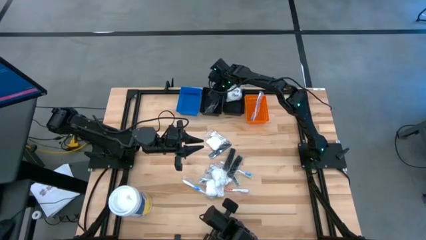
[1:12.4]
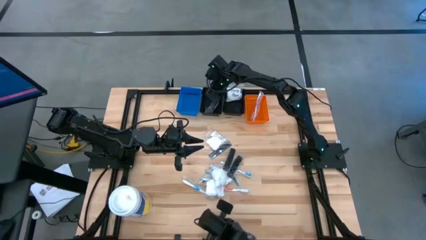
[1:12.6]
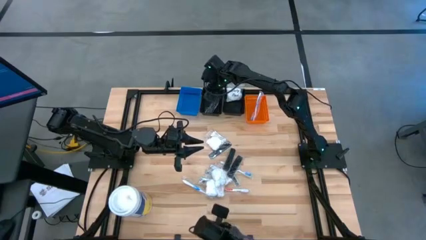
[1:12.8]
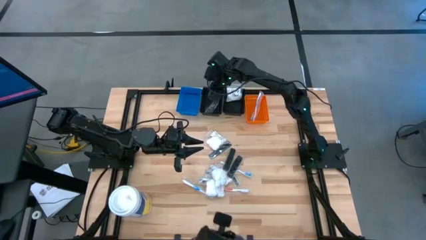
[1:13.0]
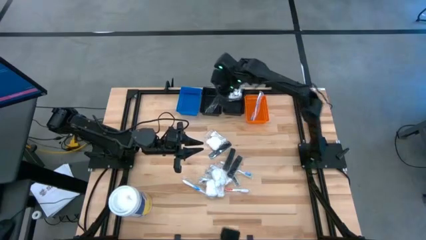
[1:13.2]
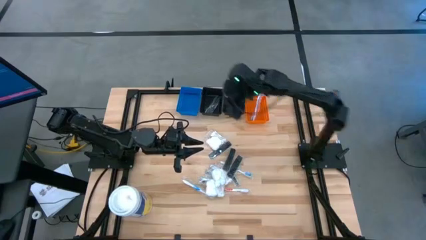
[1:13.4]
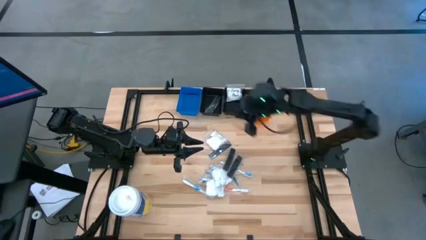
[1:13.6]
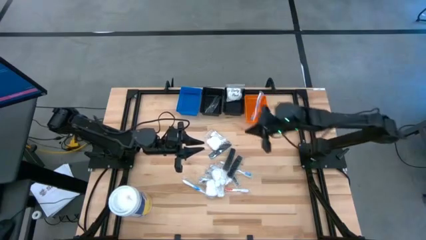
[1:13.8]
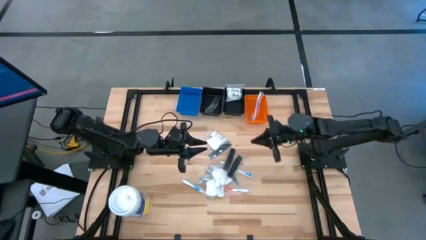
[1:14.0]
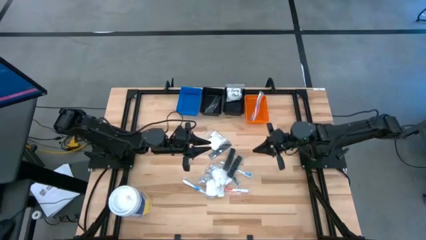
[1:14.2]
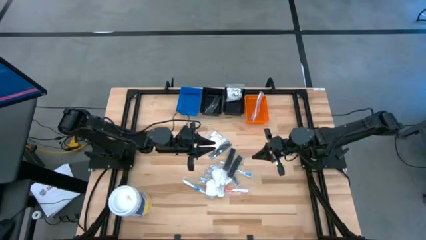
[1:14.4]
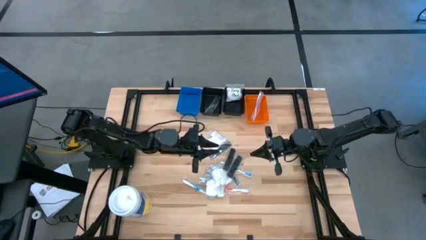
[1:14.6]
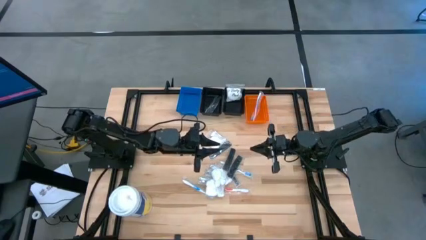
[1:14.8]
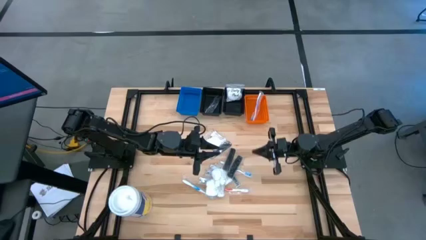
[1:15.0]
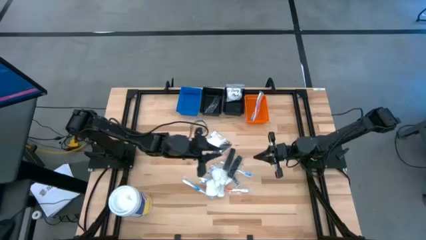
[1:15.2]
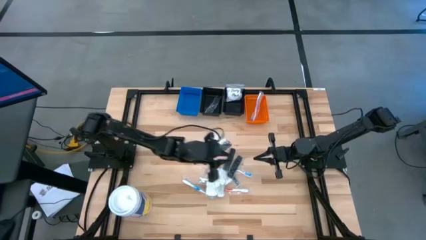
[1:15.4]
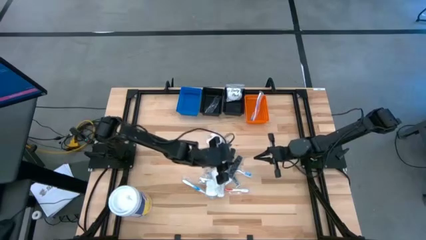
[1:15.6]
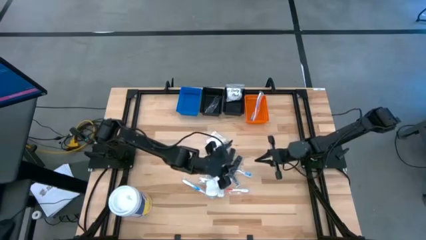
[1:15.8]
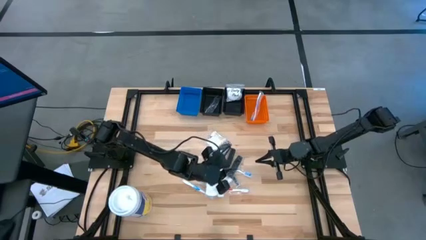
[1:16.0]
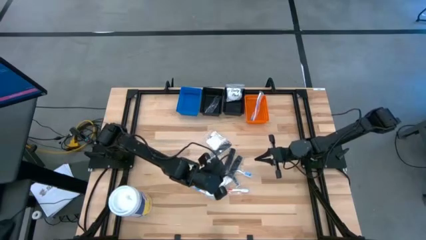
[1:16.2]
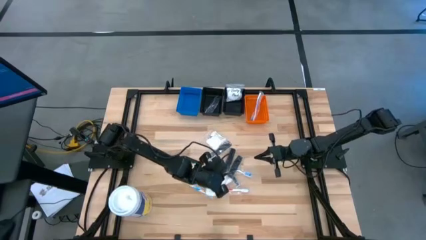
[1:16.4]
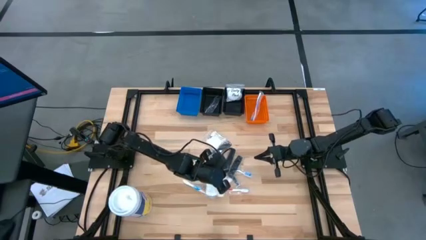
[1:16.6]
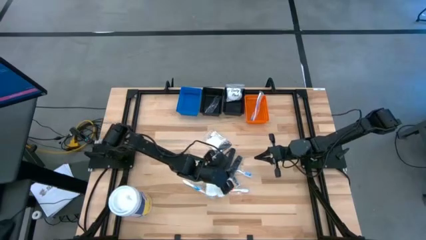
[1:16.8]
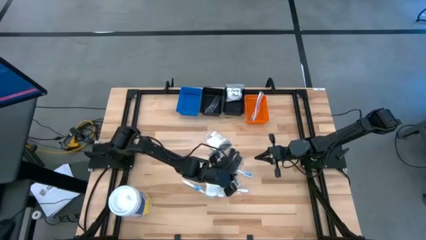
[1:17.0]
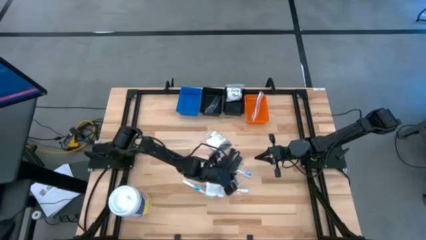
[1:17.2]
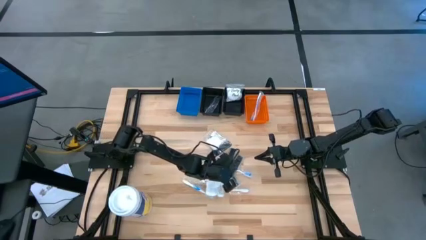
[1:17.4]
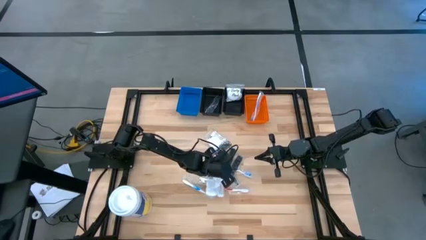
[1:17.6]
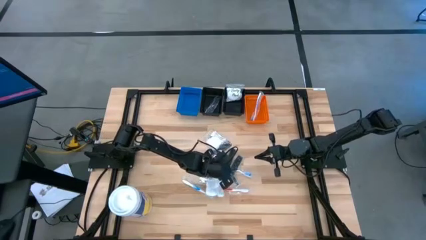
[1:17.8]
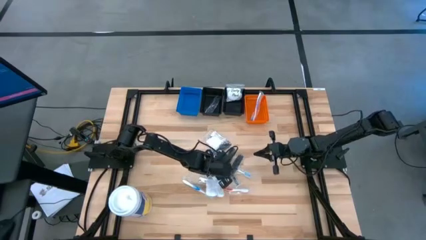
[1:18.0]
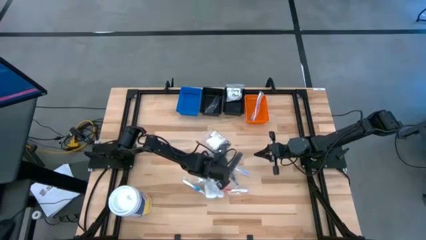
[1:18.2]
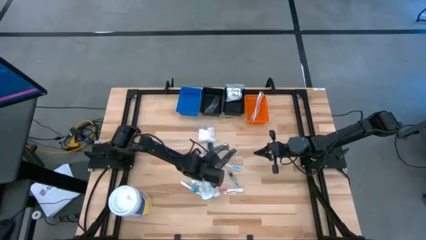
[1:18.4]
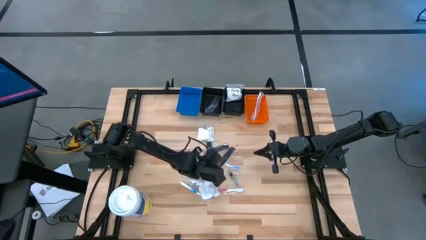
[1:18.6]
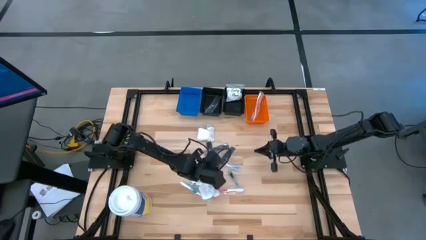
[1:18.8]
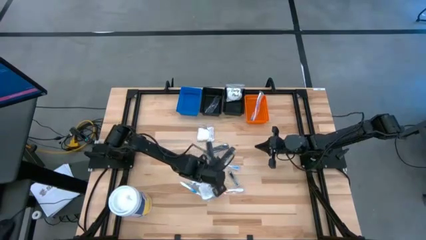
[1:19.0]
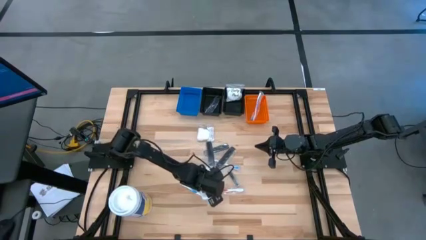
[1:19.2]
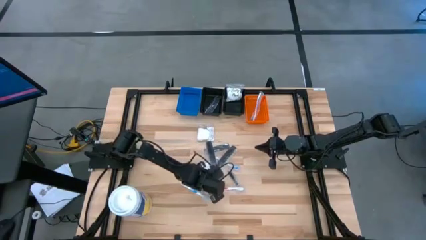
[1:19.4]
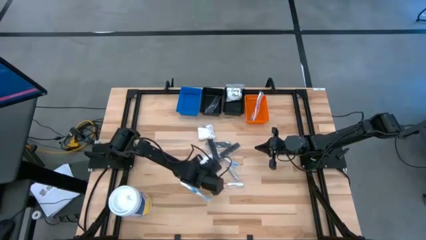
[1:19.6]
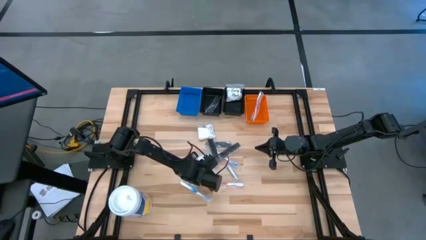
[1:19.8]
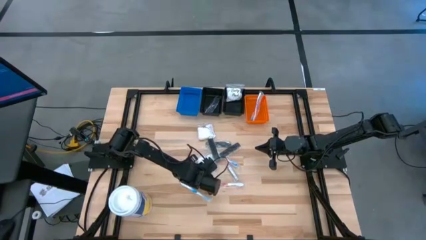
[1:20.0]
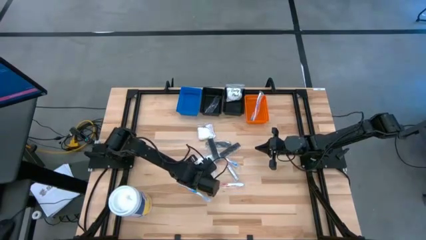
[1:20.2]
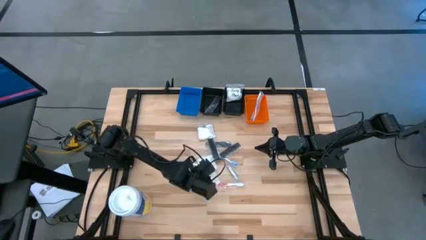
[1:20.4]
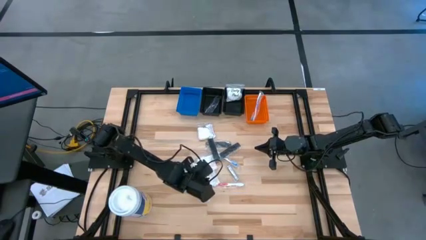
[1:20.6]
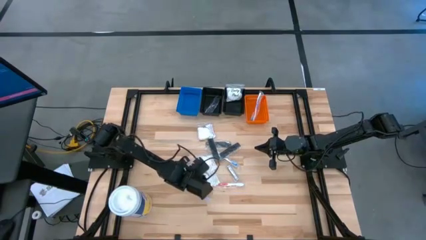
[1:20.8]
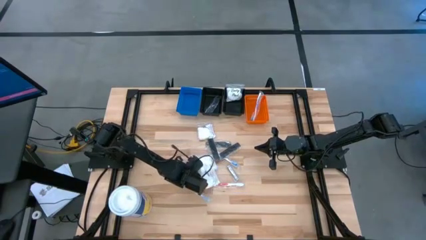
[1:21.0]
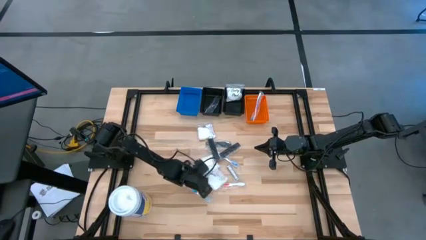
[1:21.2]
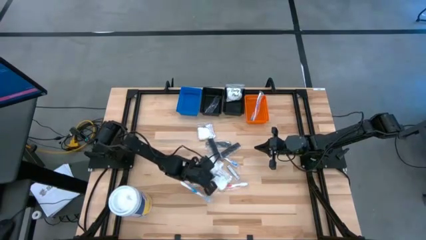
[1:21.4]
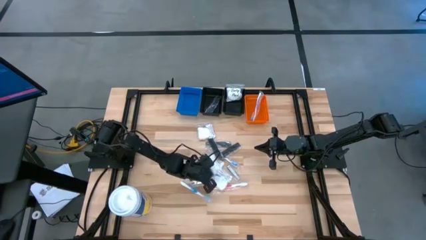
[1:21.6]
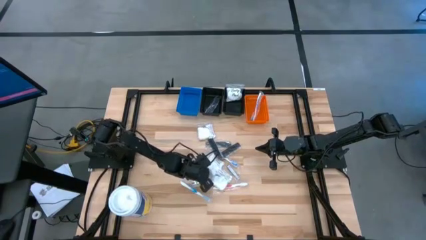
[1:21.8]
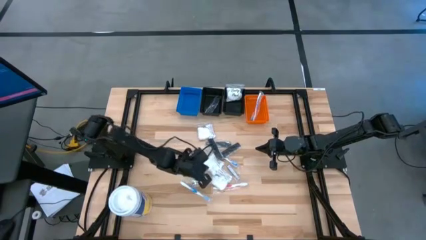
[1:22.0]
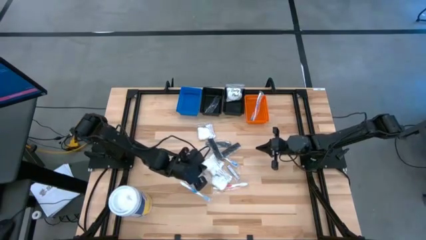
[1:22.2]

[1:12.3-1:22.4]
Task: Pick & Place Travel size toiletries
Put the silver nail cutter into the blue bin

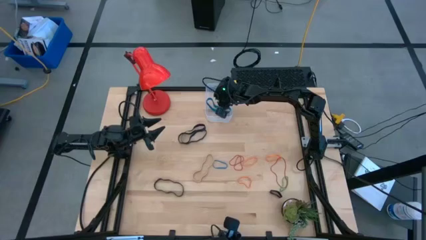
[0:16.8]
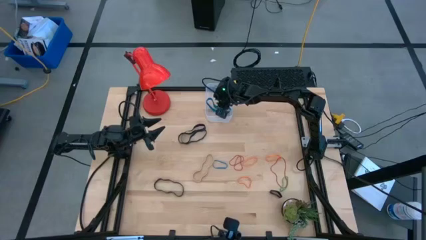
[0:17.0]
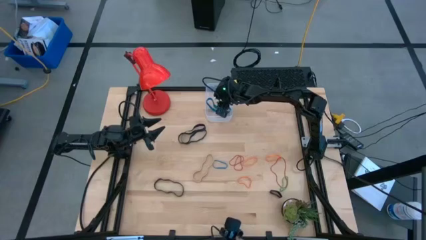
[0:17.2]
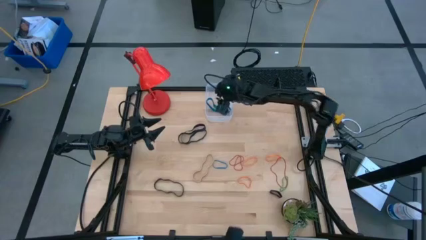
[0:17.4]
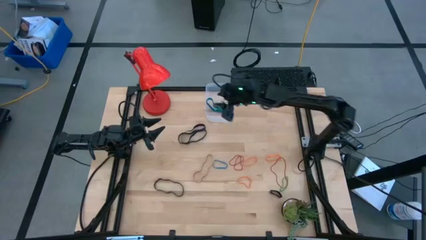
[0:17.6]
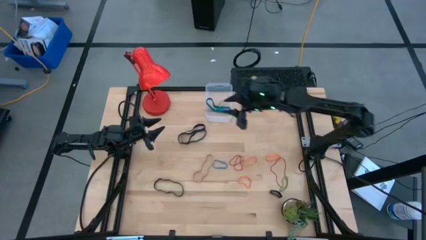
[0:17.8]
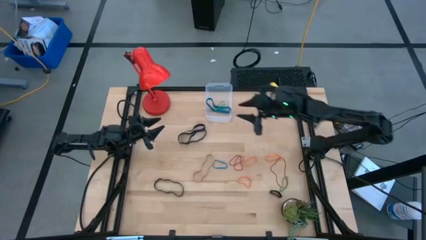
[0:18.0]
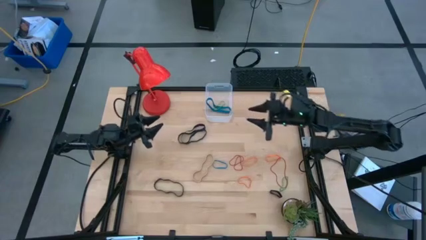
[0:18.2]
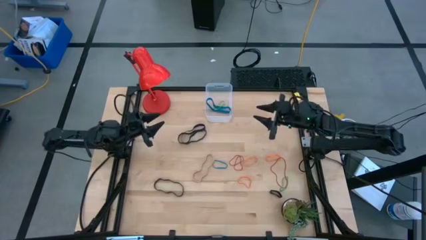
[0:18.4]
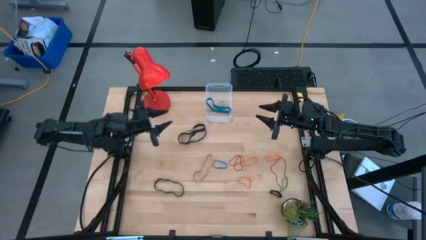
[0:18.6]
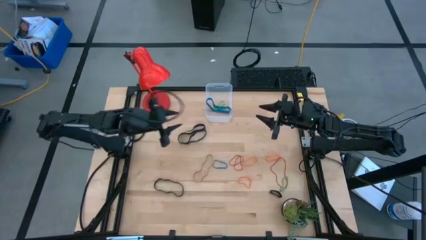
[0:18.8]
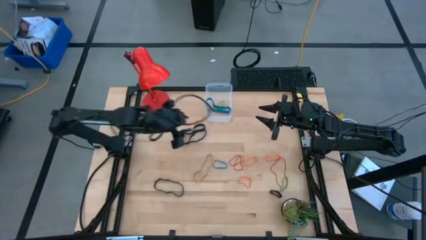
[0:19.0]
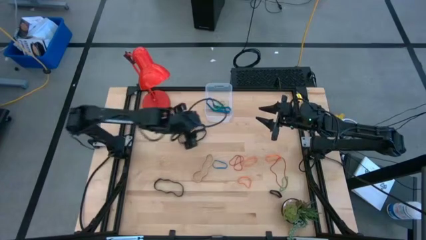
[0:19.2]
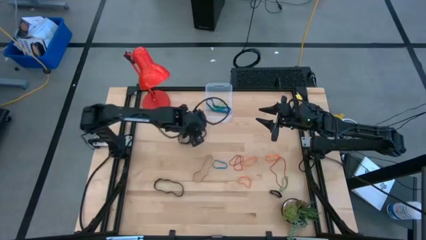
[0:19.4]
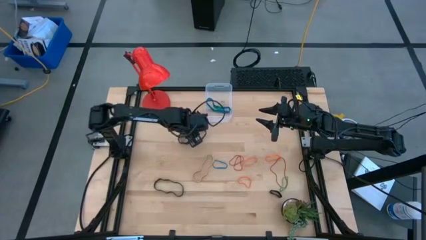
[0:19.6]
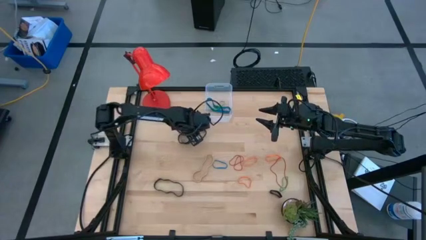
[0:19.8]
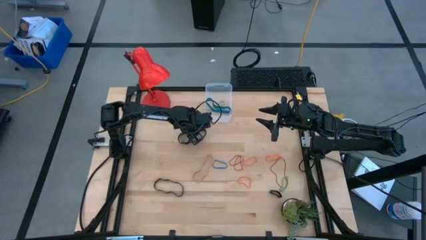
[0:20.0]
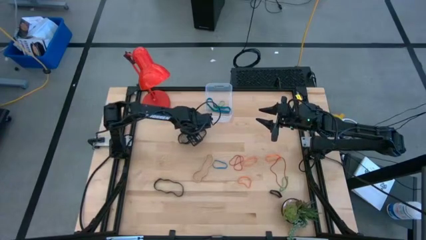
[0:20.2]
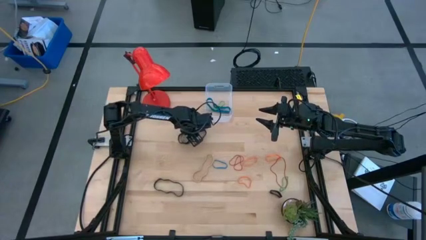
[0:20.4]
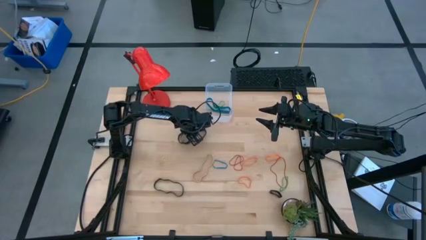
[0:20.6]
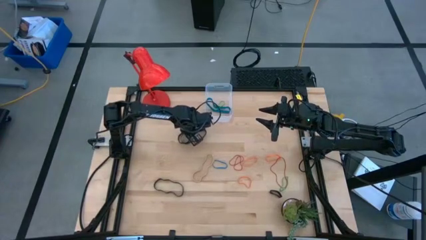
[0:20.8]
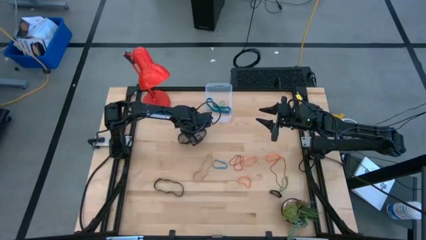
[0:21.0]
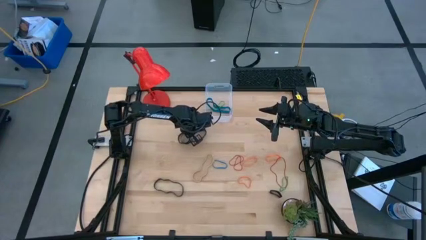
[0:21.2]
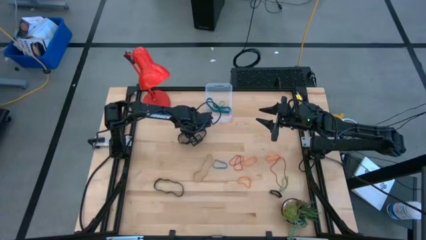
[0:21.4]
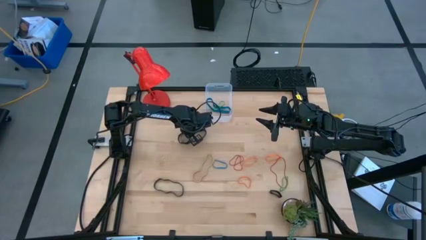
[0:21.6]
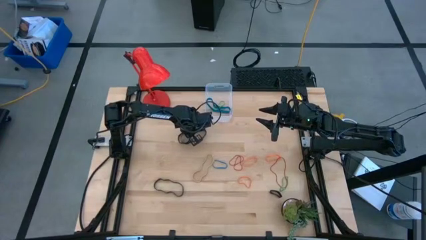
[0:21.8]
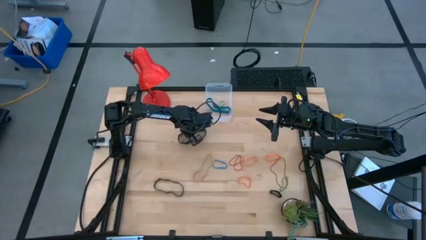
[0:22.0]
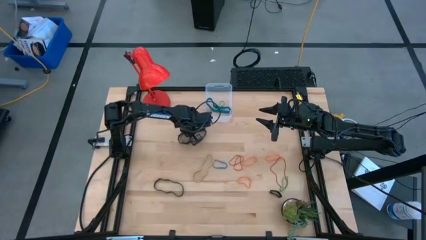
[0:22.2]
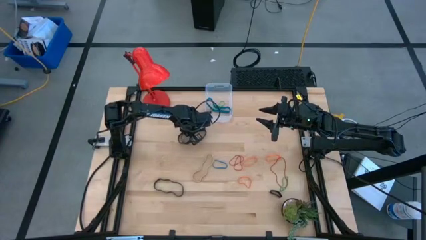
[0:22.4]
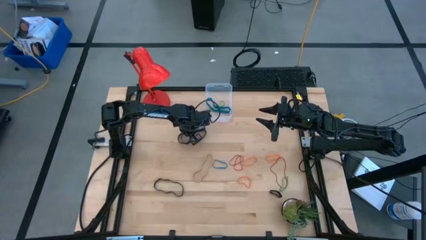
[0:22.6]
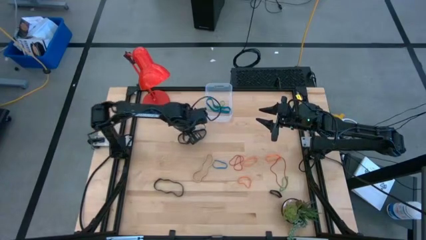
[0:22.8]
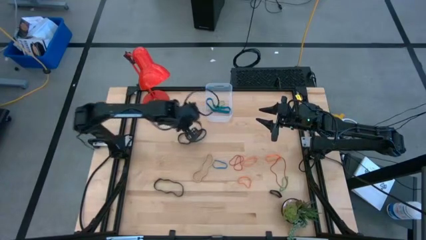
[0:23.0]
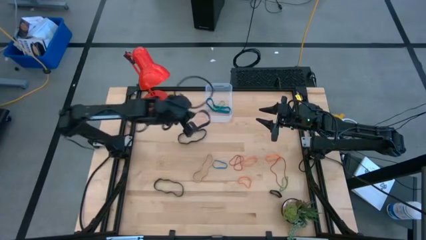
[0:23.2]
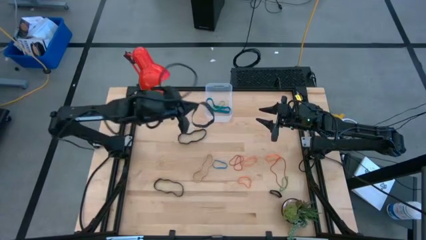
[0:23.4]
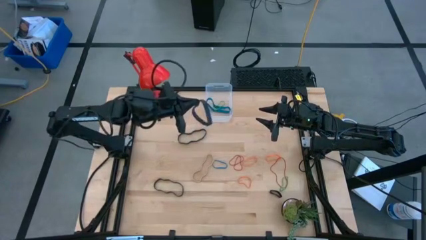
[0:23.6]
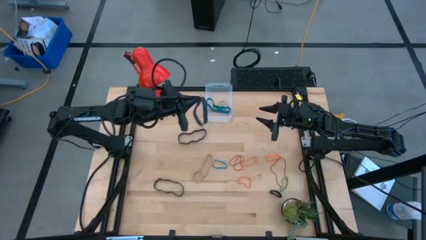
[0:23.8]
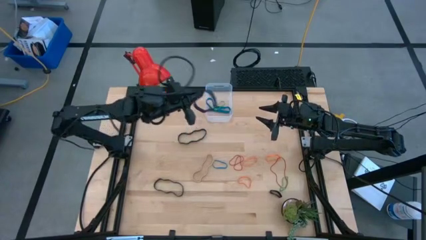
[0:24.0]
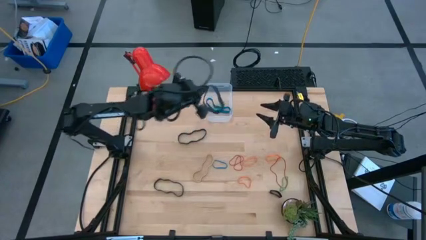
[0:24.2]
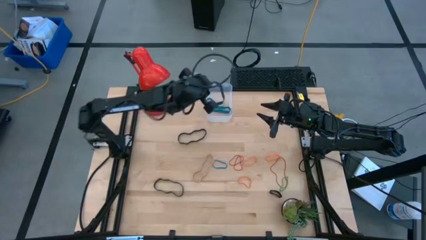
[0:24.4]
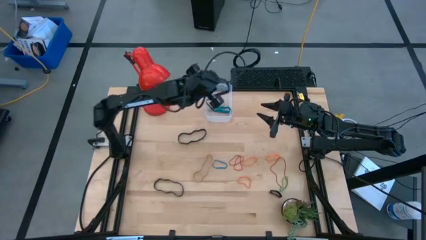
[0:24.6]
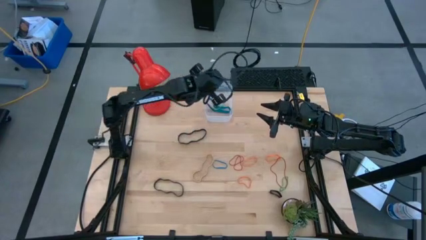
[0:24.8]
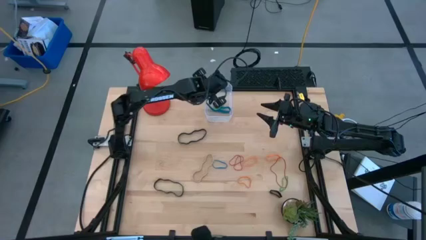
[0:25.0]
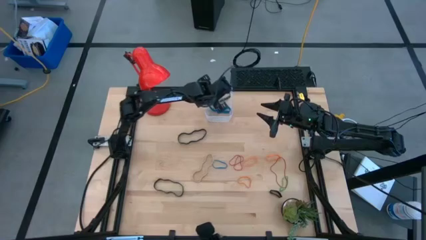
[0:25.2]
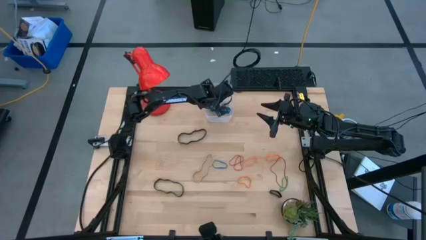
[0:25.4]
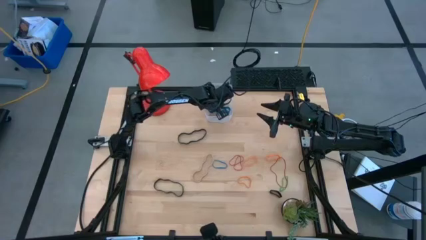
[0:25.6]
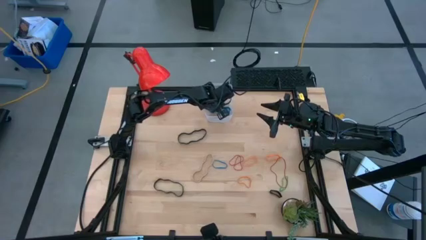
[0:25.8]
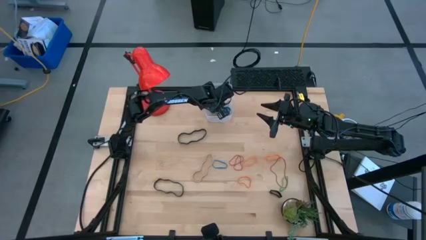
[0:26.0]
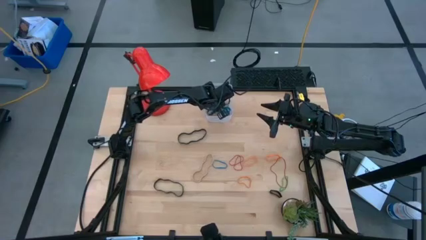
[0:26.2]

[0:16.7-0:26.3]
Task: Pick and place rubber bands into bin
Put the black rubber band into the transparent bin
